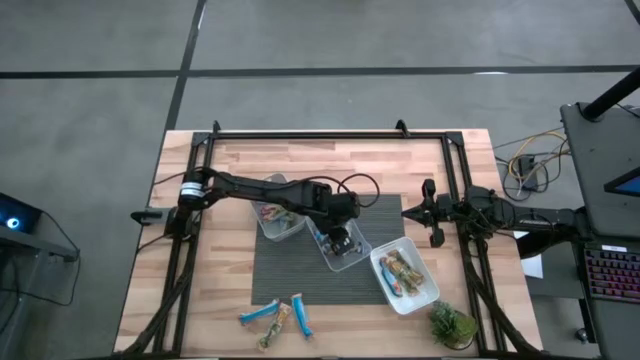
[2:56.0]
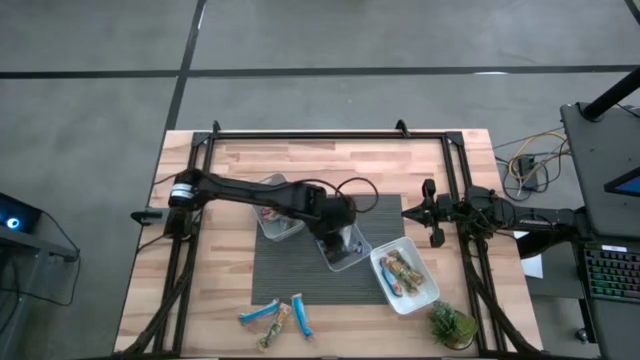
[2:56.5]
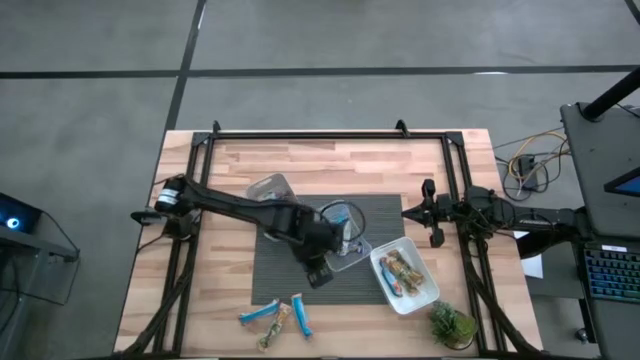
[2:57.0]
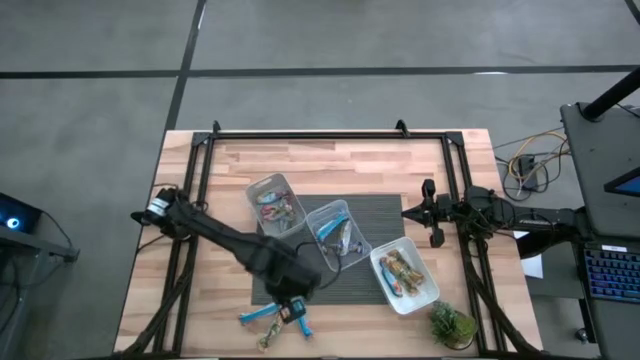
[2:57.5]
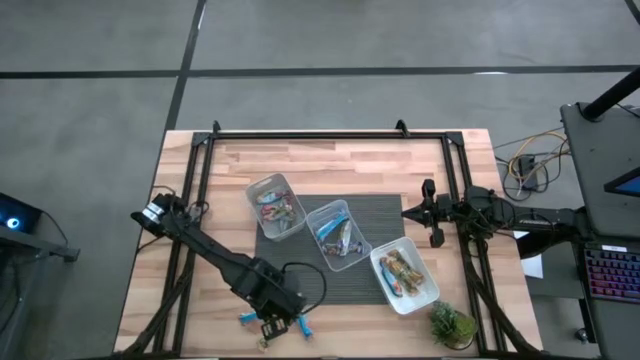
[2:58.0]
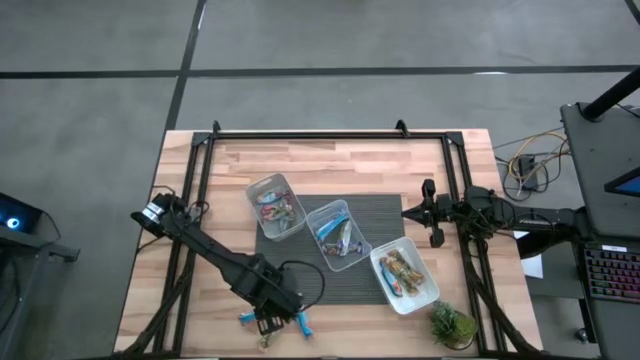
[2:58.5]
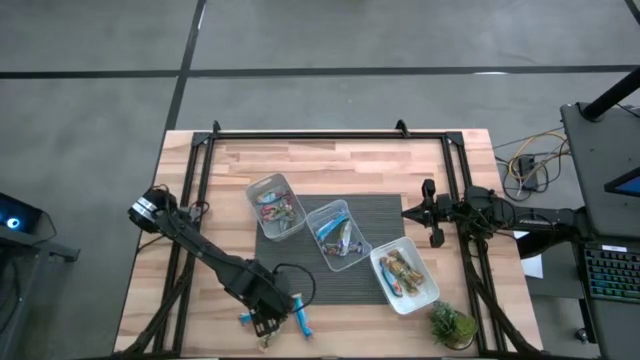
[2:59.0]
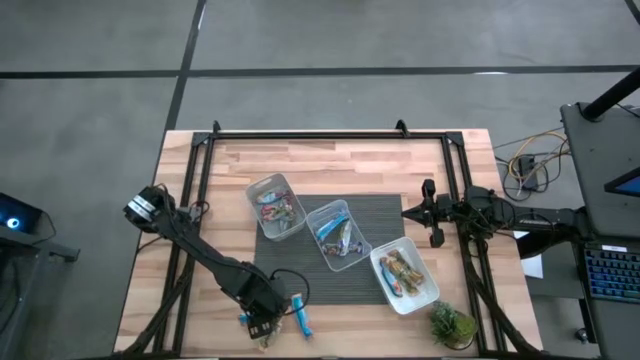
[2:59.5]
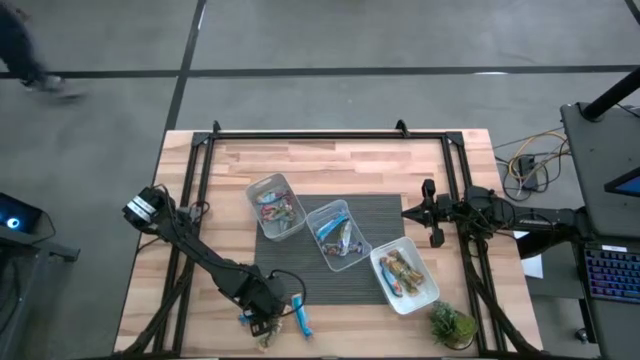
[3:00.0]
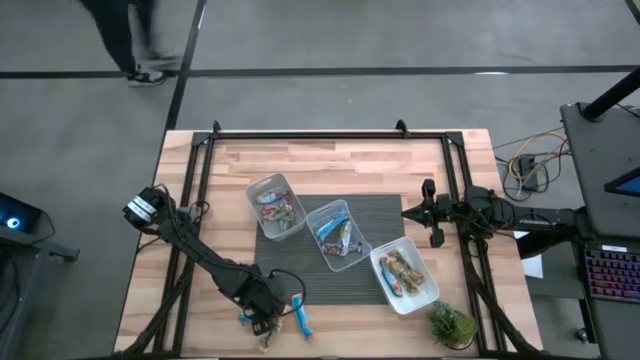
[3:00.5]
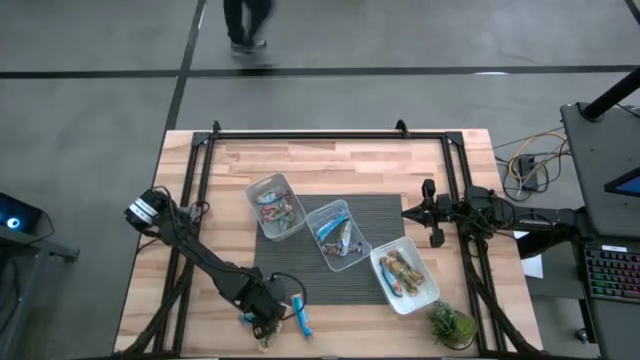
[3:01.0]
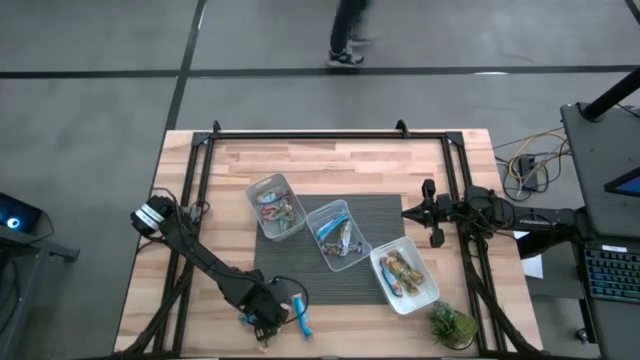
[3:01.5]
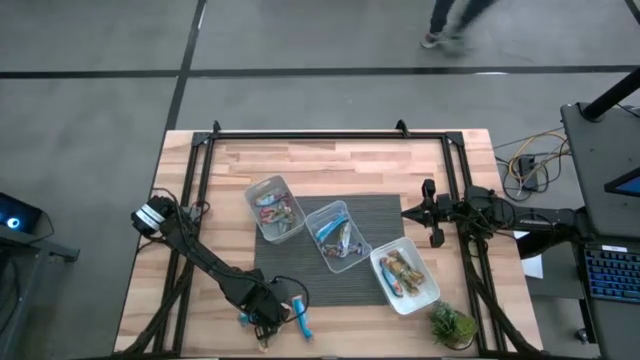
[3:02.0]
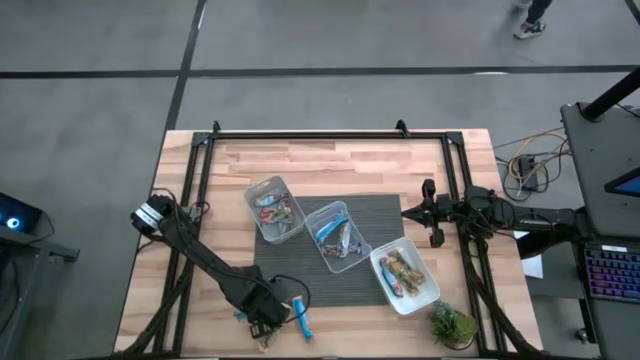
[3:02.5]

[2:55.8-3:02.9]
Task: Pick and place Granola Bars by type
Put the red granola bar into the gray bin

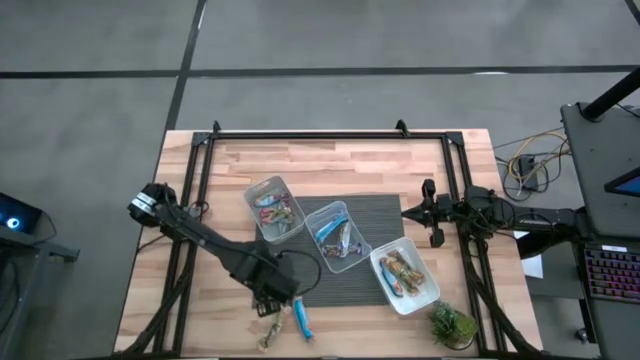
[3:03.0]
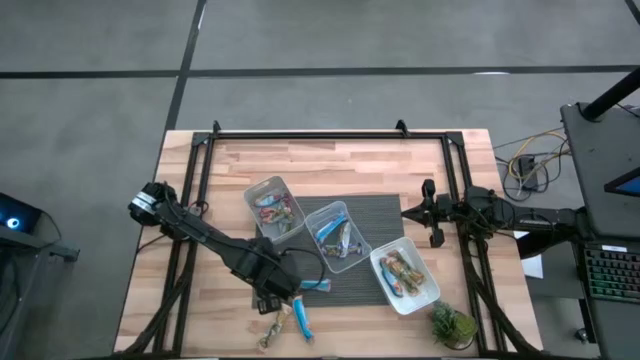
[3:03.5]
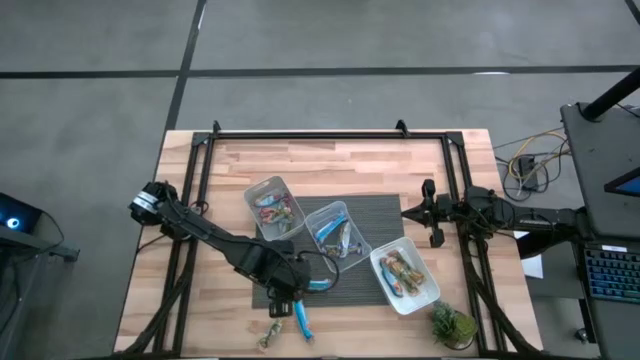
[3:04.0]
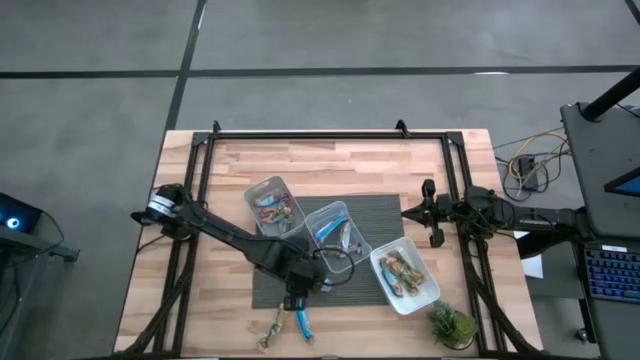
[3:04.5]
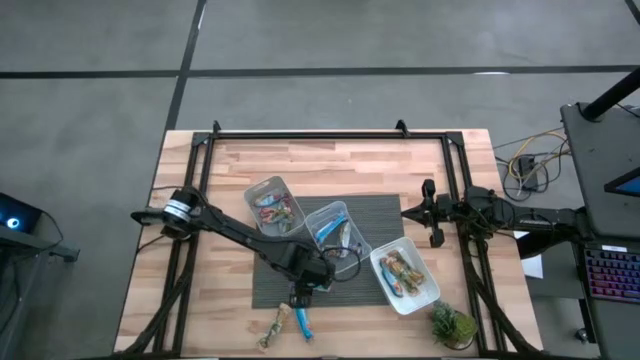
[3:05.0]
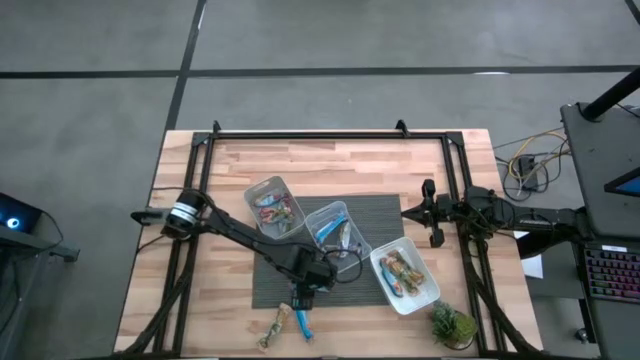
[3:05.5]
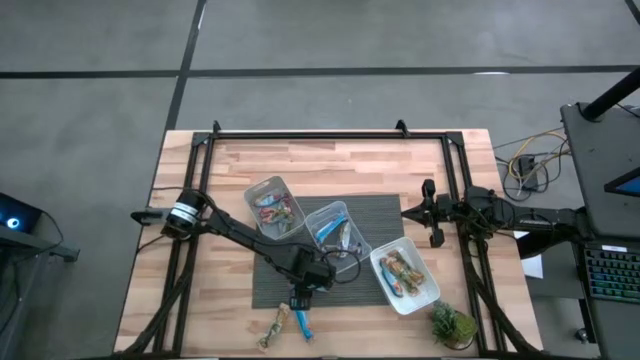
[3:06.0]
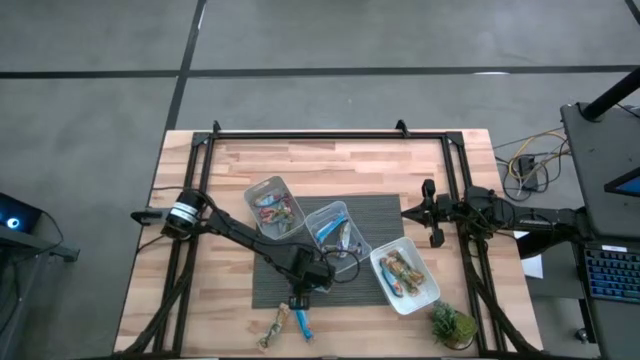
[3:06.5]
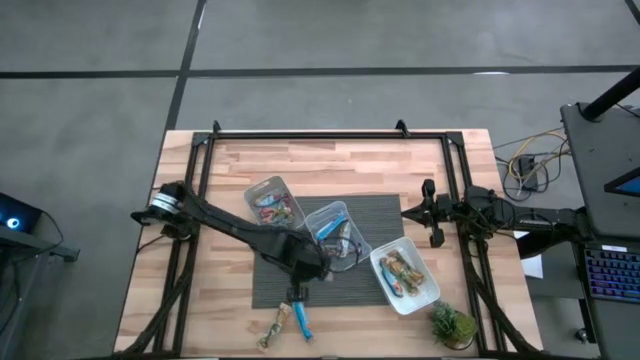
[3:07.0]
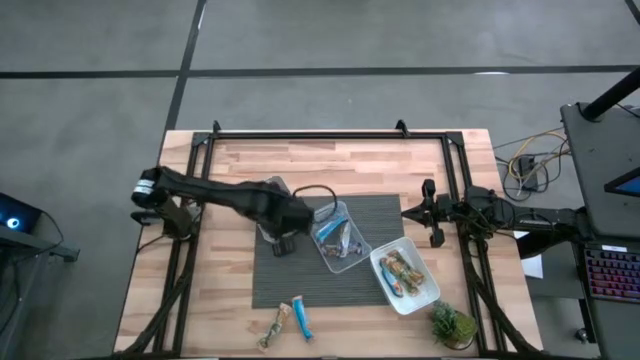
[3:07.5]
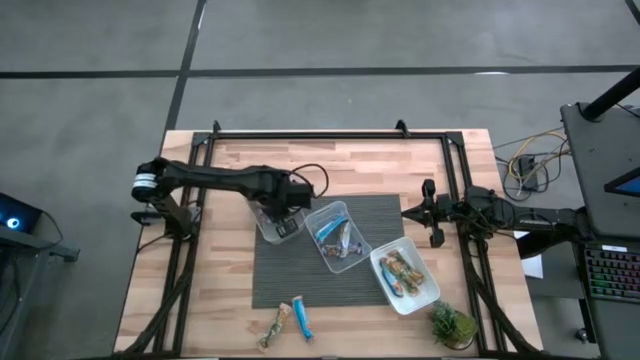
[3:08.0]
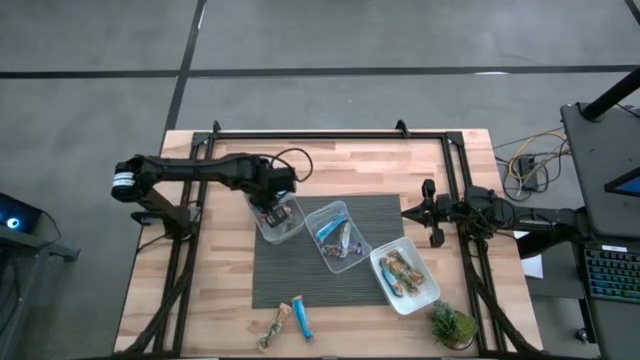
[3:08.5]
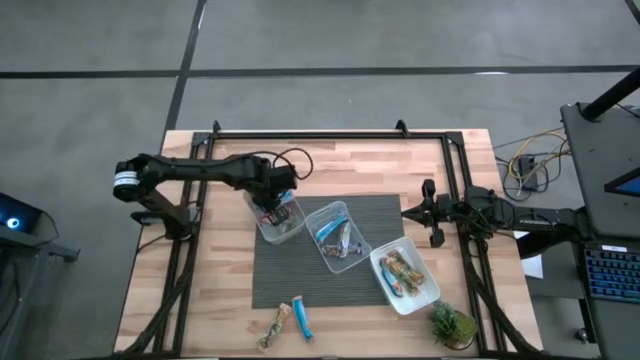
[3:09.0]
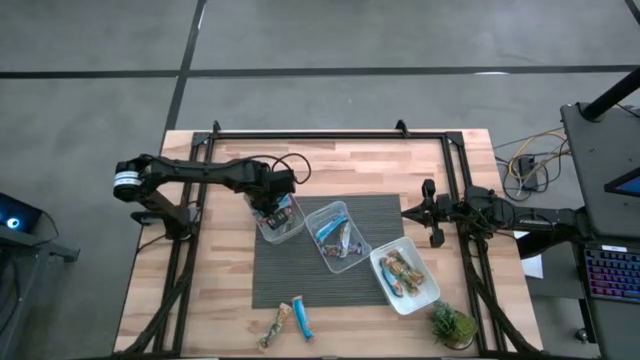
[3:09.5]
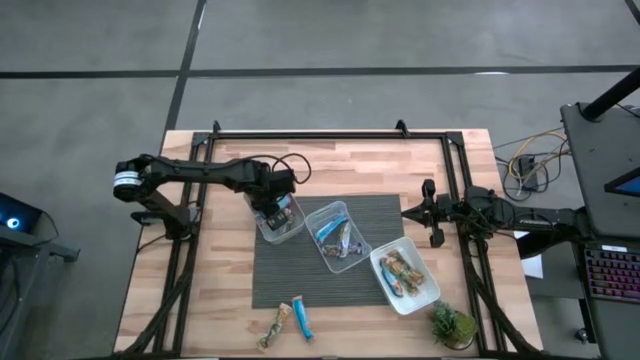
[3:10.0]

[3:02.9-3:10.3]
Put the red granola bar into the gray bin

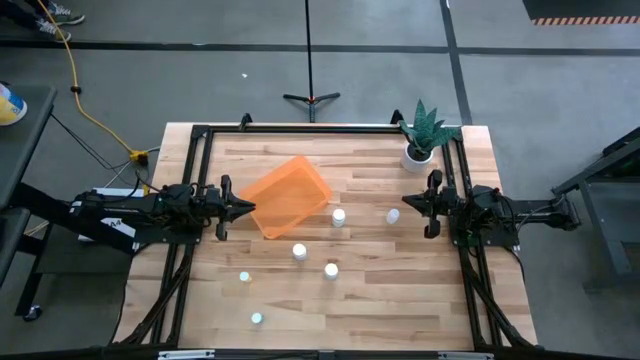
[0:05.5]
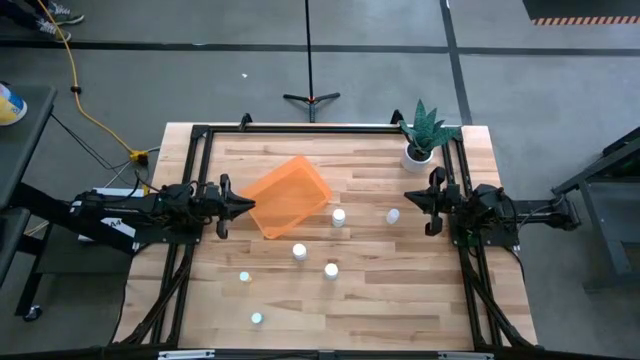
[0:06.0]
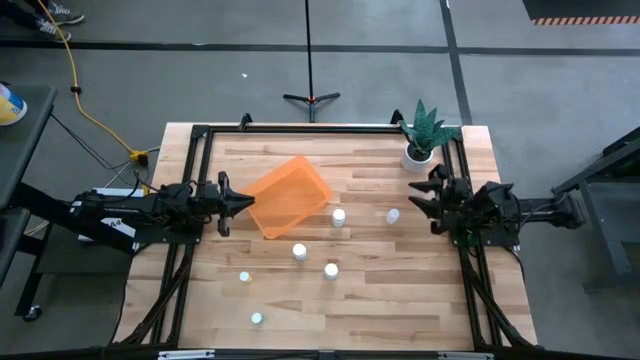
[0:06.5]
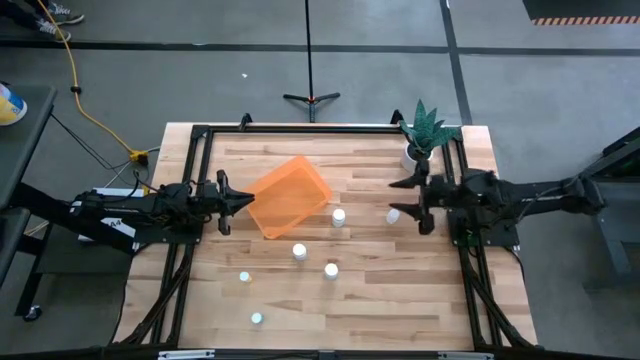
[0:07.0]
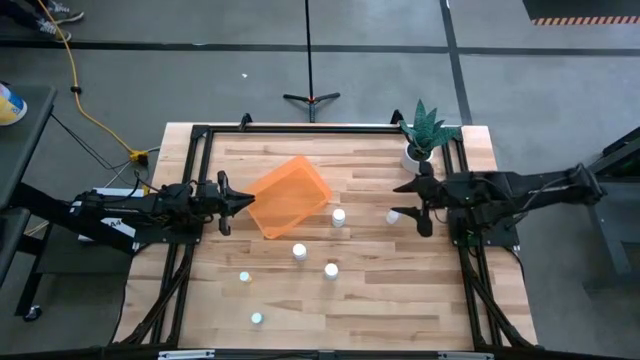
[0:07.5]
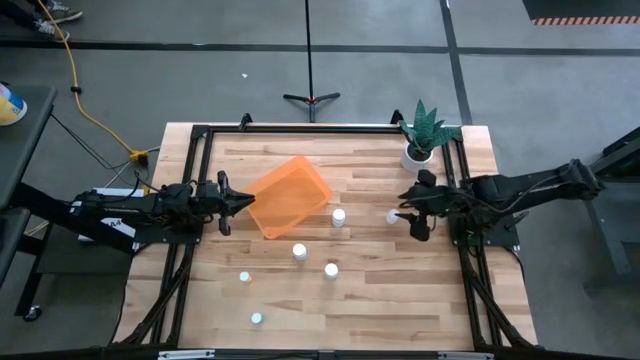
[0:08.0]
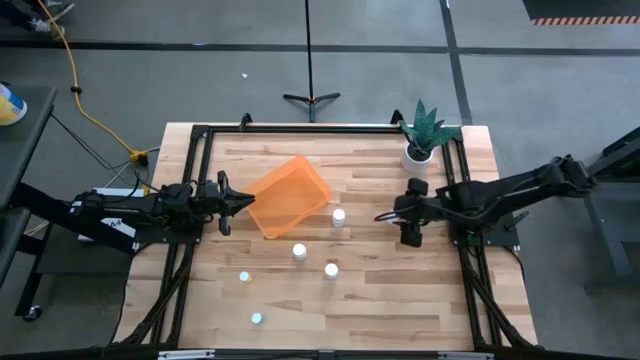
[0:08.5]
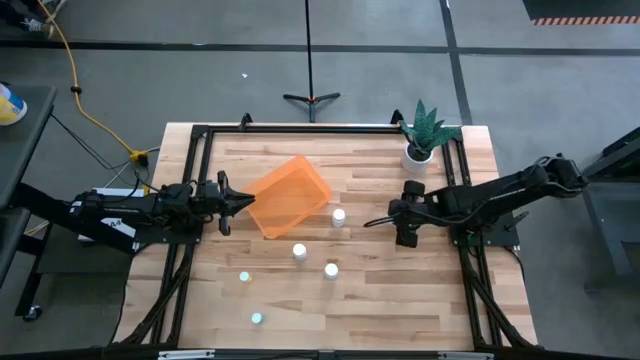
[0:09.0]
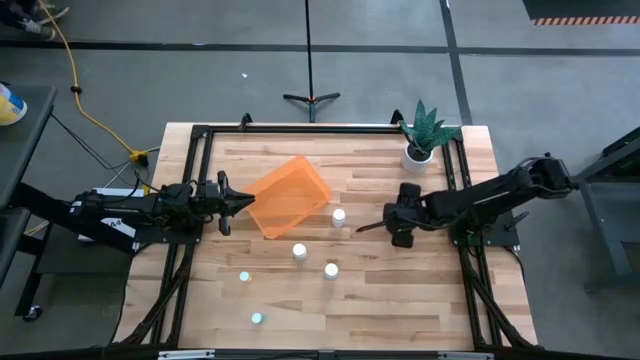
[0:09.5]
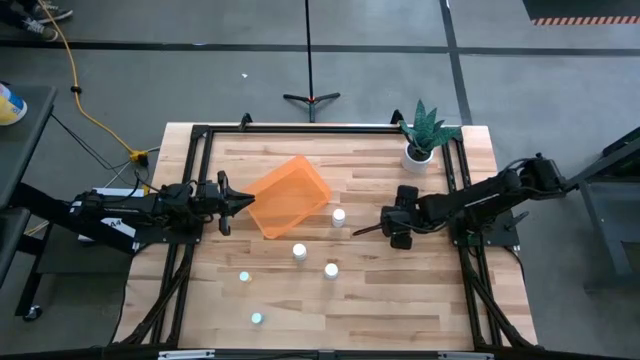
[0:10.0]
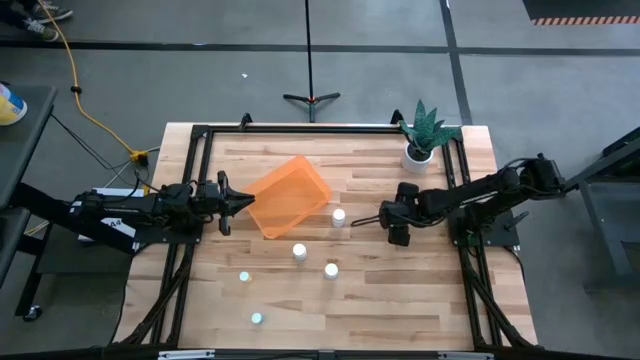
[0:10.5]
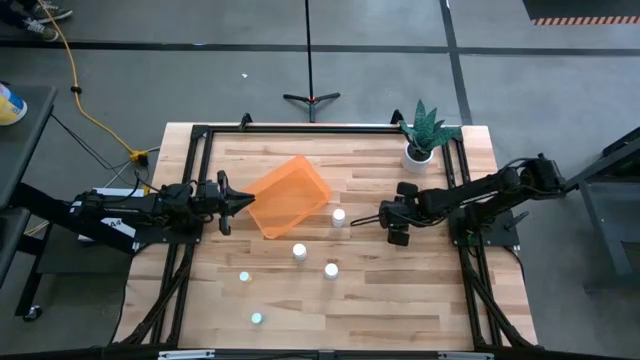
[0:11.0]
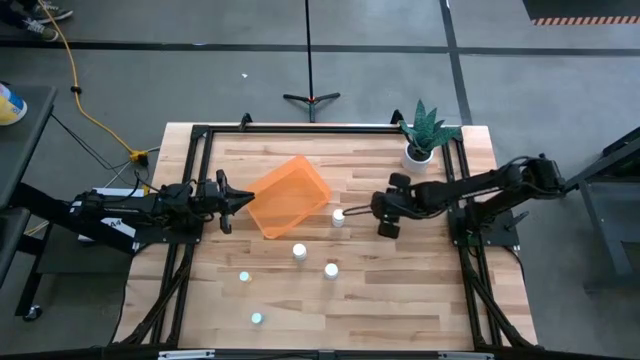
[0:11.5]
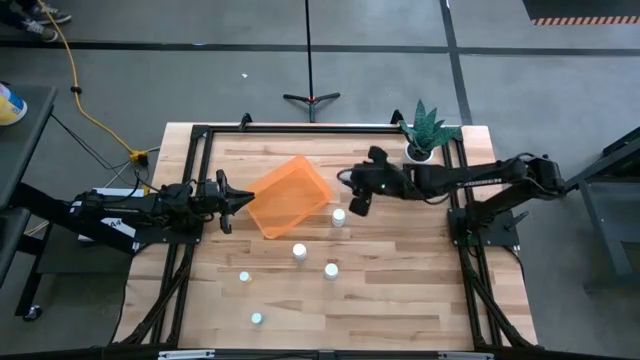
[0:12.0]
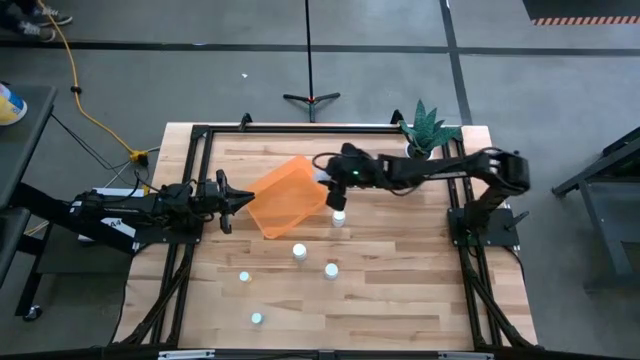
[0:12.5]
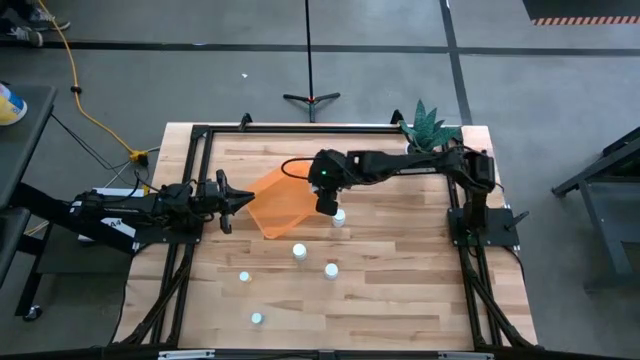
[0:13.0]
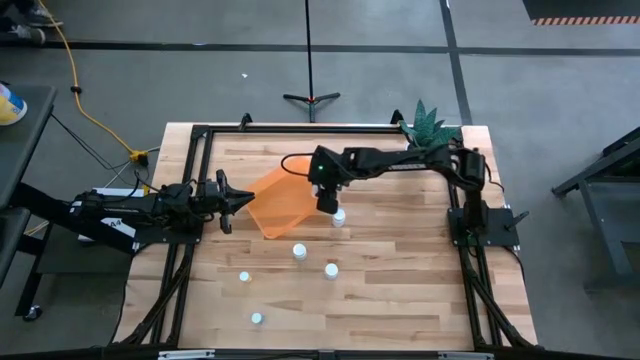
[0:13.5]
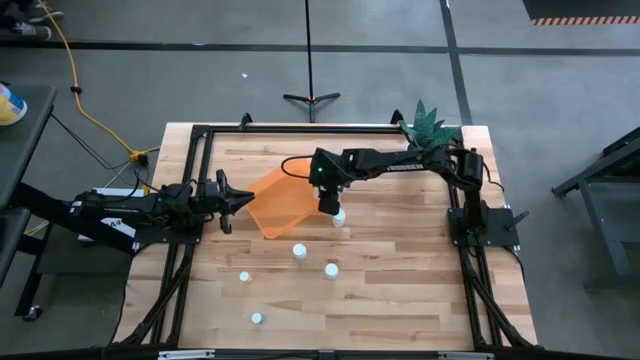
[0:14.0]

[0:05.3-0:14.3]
Task: Pick and place pill bottles into a basket
Put the transparent pill bottle into the orange bin
